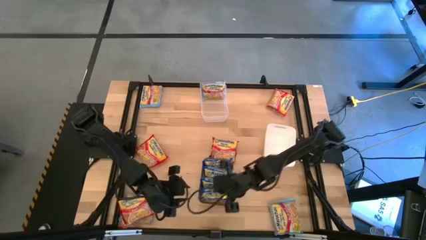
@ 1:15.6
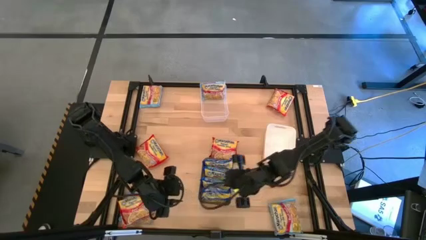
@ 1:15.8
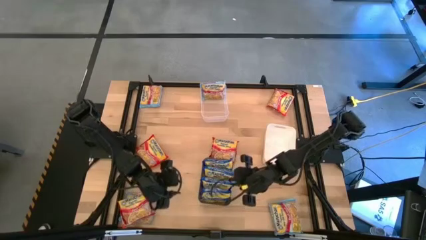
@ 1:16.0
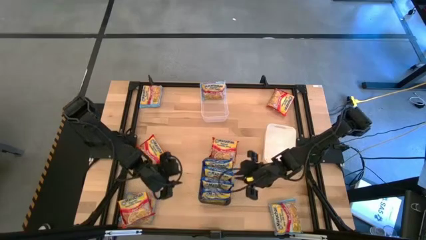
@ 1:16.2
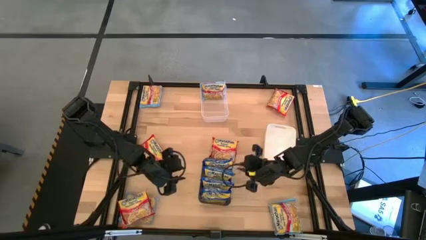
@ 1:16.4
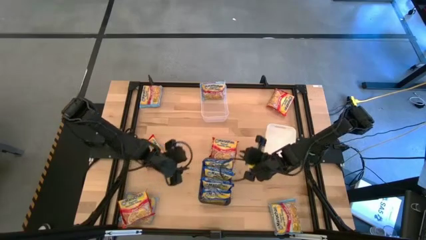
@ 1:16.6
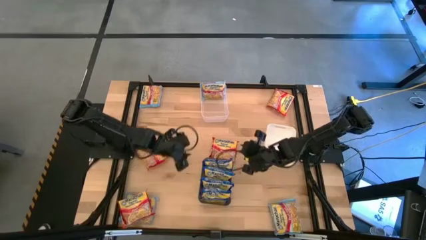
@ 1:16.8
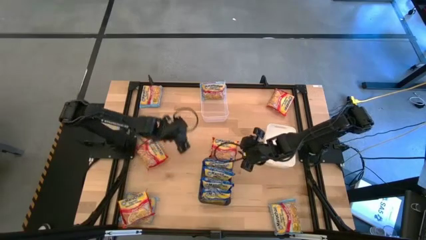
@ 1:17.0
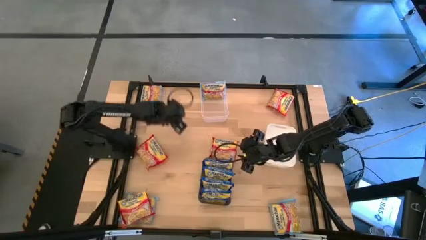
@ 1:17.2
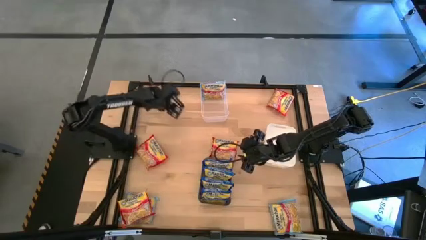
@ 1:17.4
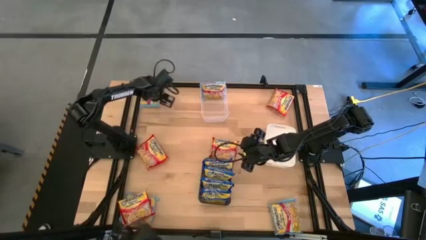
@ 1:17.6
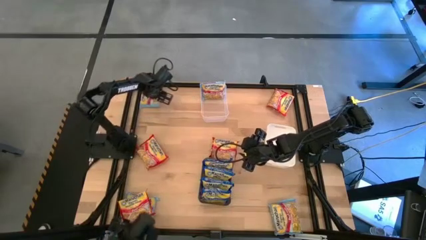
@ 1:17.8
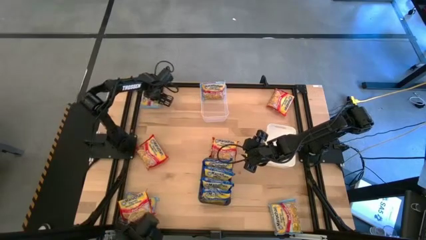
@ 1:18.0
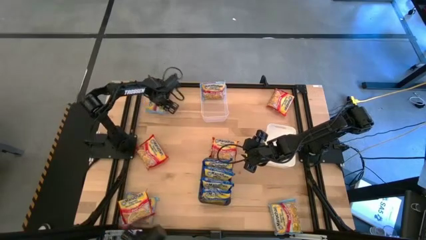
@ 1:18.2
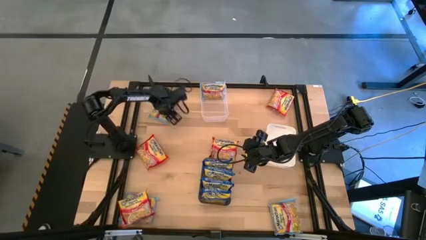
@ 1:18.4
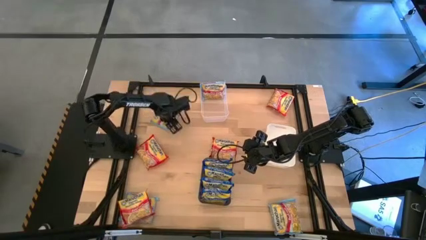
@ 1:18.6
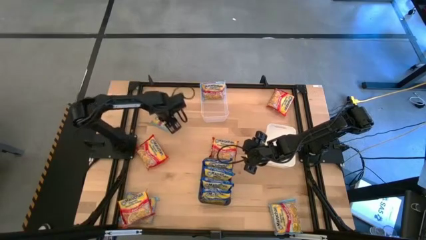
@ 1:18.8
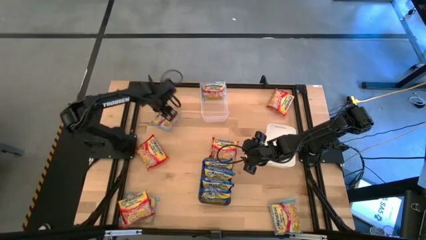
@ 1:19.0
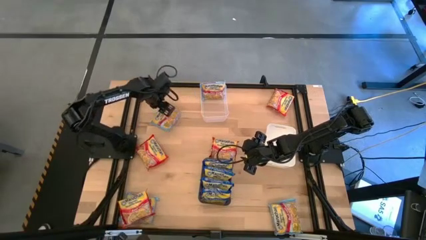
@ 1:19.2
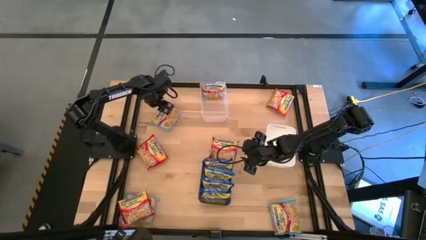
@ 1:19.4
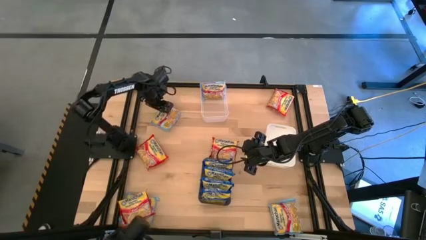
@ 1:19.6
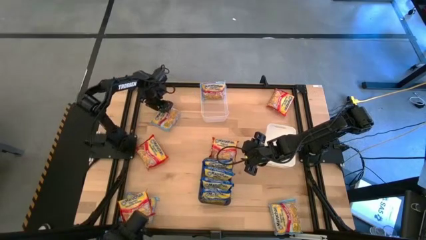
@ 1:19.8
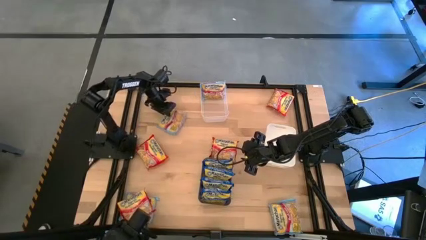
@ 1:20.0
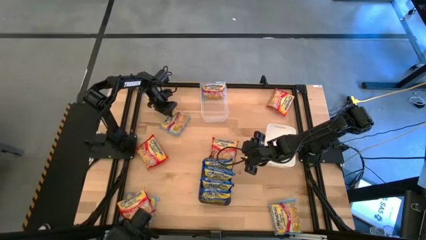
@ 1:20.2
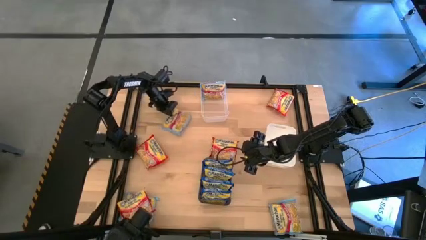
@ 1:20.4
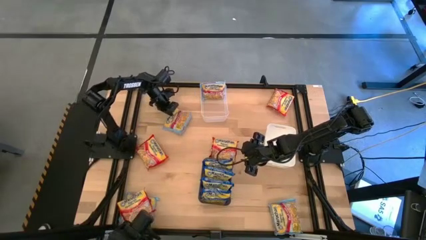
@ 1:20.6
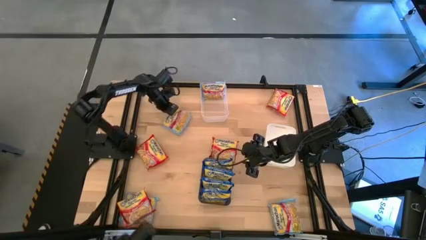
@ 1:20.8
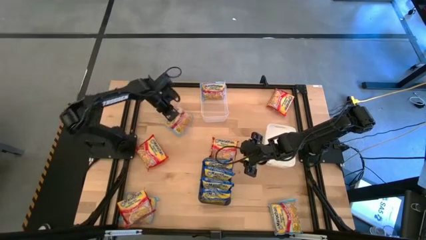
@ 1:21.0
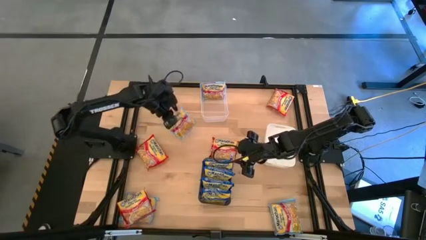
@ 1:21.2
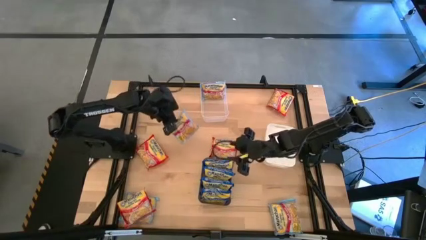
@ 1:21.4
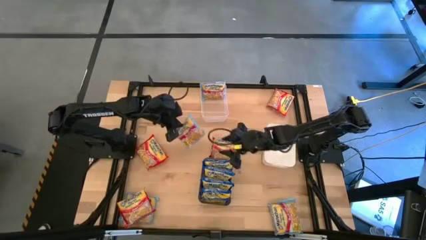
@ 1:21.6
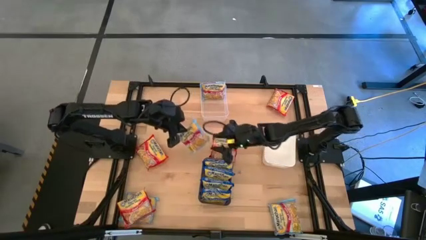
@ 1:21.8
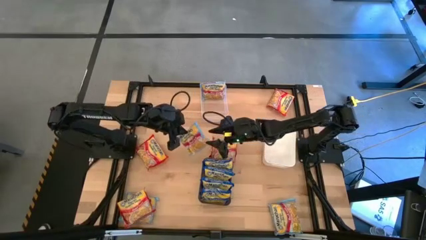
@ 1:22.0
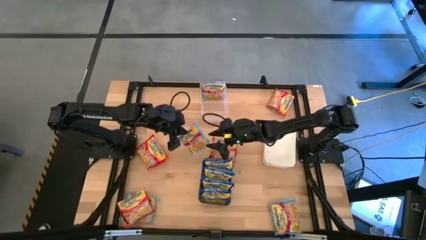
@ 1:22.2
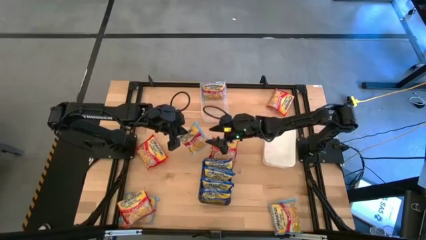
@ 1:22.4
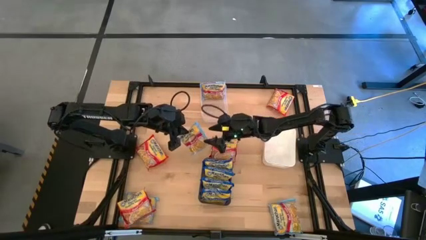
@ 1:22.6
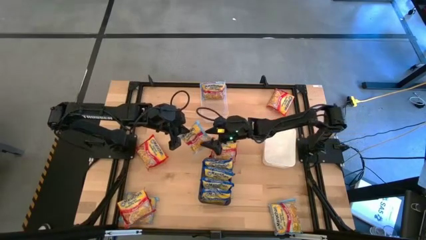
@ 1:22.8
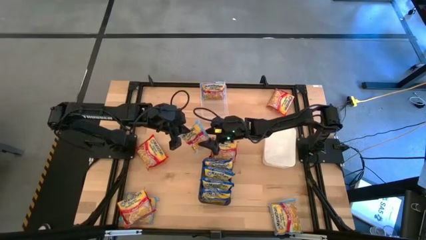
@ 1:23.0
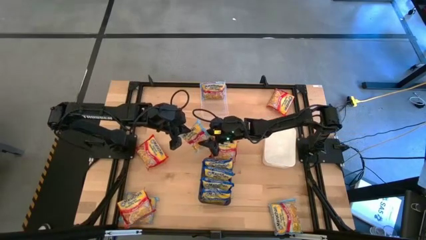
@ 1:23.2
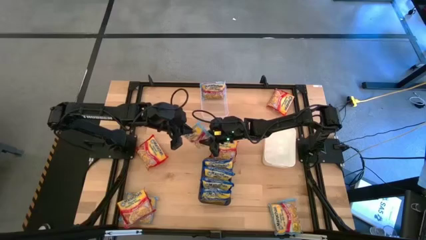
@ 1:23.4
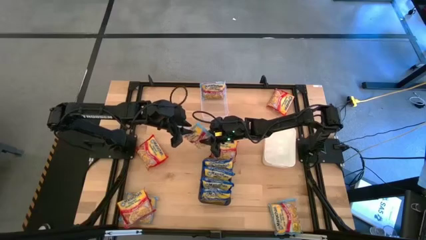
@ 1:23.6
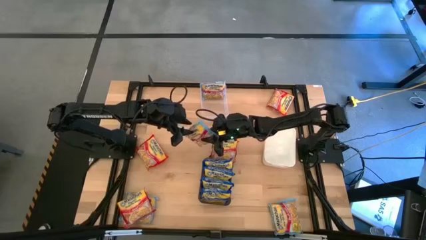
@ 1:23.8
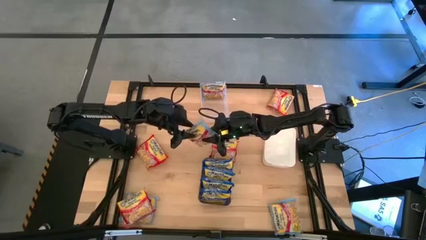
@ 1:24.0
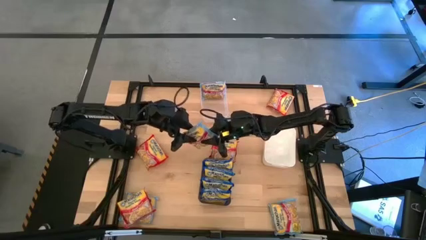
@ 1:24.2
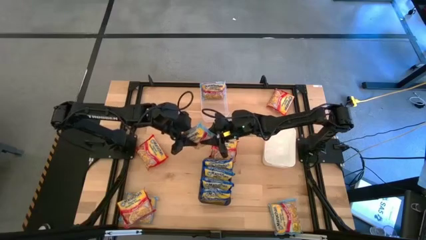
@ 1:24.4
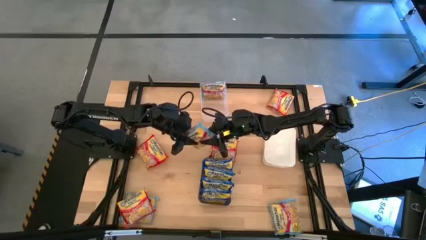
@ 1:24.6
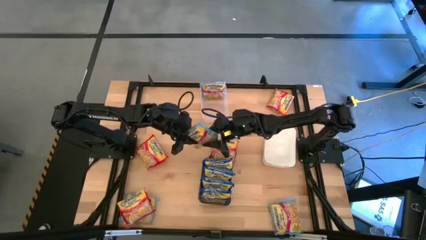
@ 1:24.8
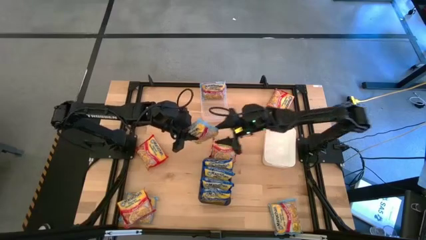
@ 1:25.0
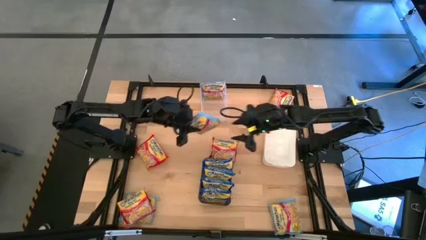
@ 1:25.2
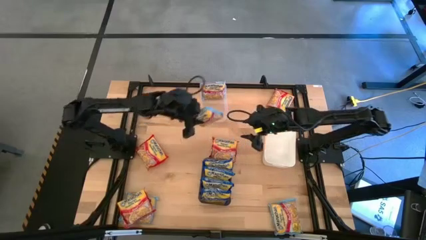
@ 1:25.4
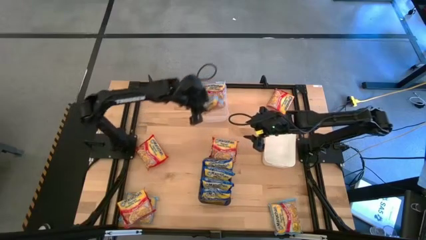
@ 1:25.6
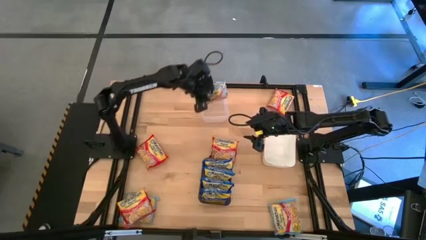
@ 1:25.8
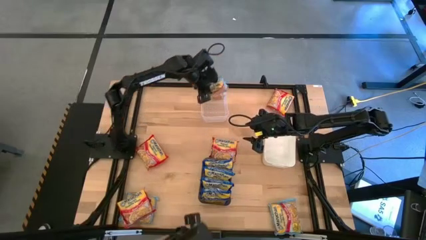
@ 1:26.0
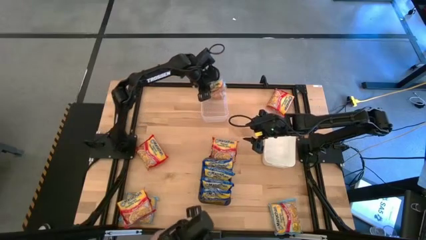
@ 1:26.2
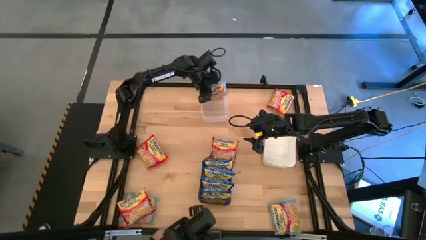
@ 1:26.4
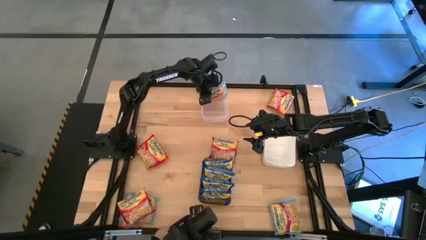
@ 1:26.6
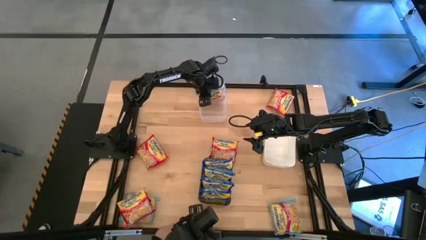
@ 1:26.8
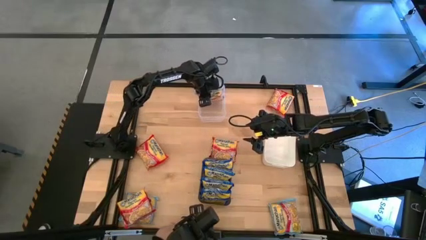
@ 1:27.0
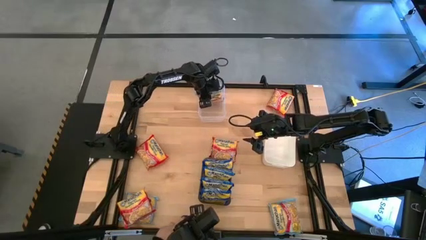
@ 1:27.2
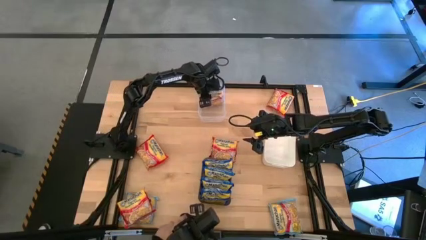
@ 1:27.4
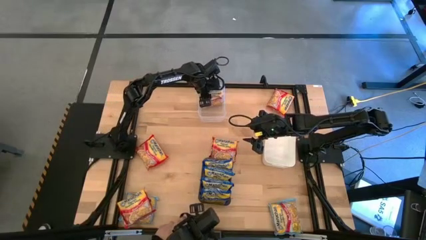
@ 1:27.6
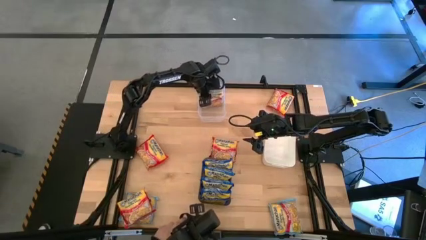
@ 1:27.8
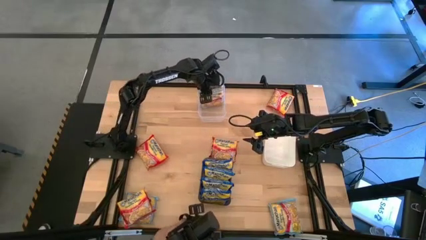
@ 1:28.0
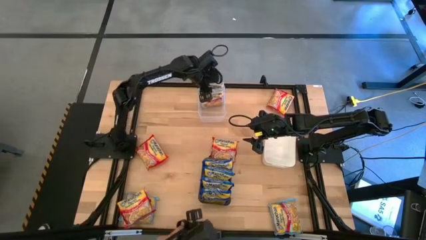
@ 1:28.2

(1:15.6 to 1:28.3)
Task: Sort Maruchan noodles
Put the top left light blue noodle pack into the transparent bin

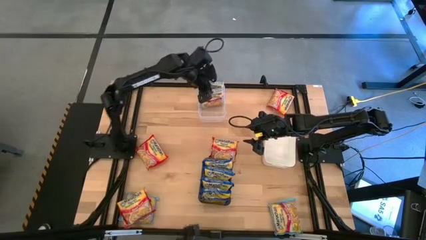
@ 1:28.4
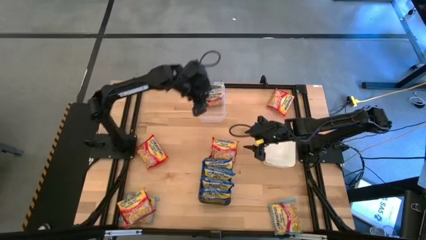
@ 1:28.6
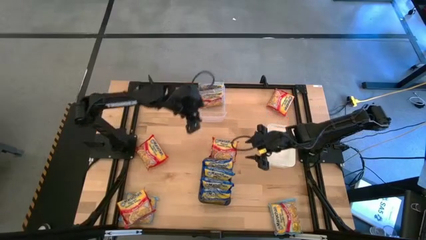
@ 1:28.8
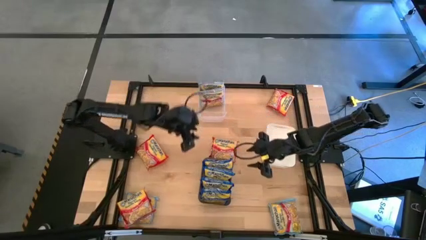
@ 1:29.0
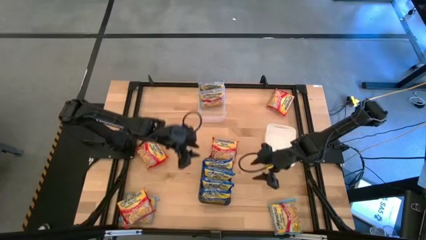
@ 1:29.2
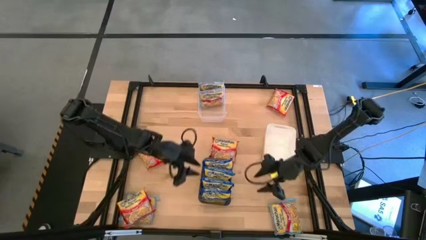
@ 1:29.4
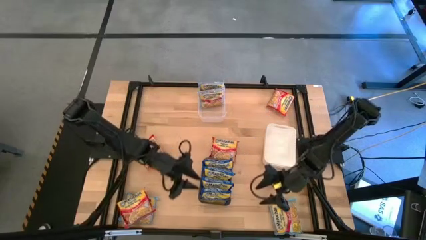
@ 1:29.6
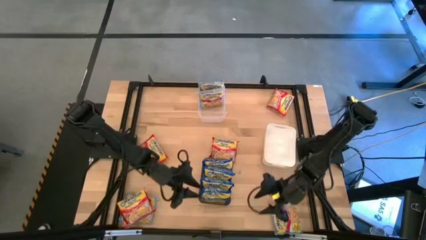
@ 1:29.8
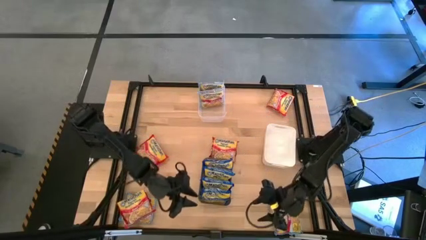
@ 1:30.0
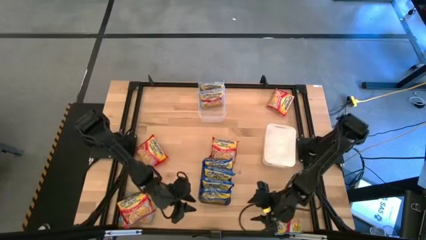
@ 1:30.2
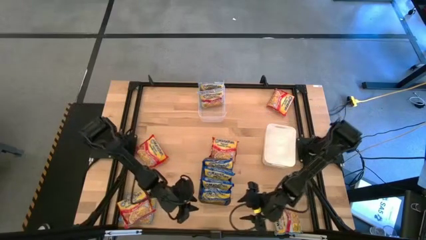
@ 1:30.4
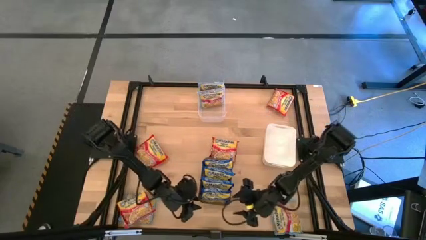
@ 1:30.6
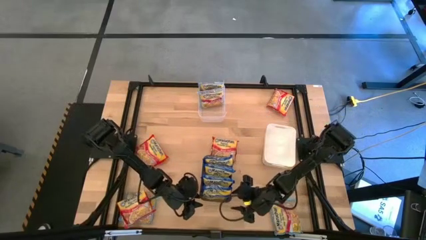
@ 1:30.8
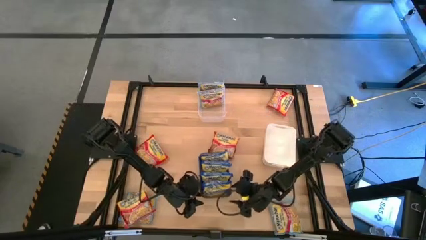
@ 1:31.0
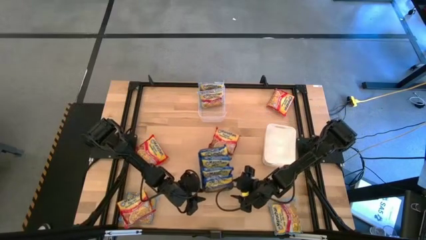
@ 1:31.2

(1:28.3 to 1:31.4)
Adjust the black bin
